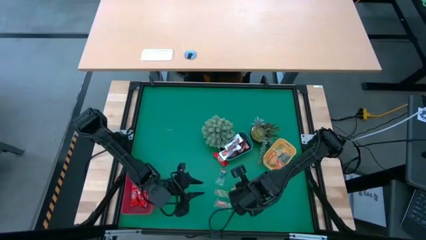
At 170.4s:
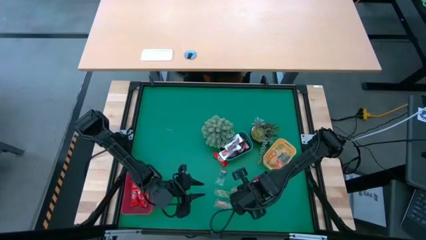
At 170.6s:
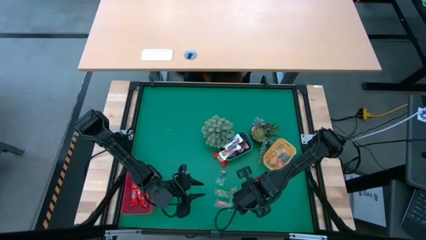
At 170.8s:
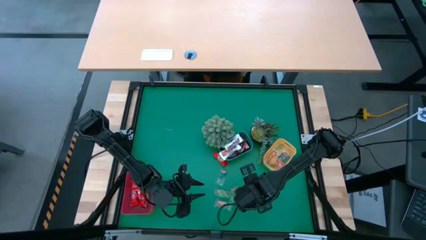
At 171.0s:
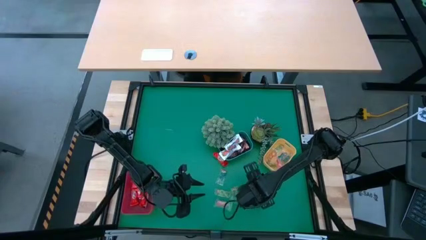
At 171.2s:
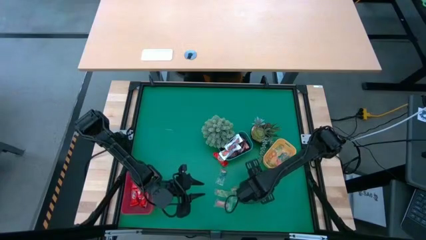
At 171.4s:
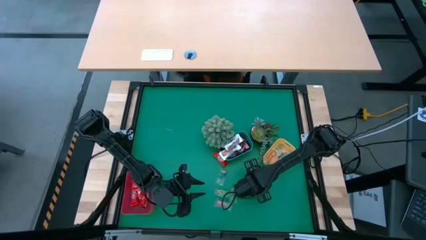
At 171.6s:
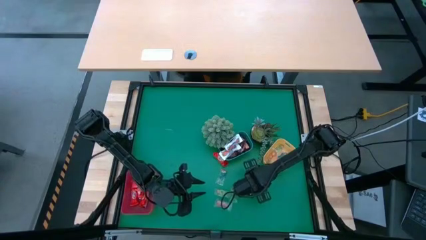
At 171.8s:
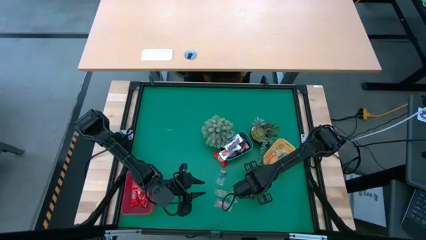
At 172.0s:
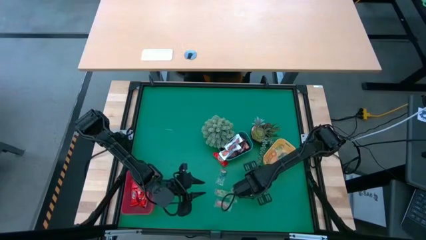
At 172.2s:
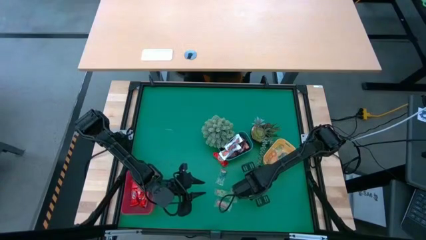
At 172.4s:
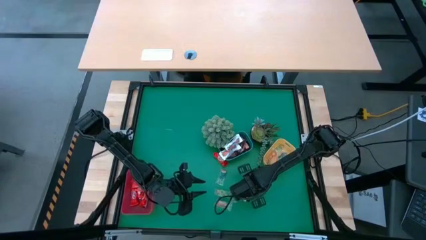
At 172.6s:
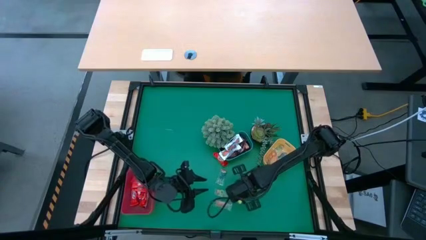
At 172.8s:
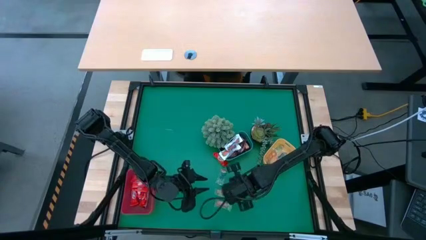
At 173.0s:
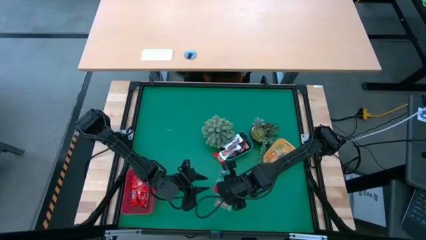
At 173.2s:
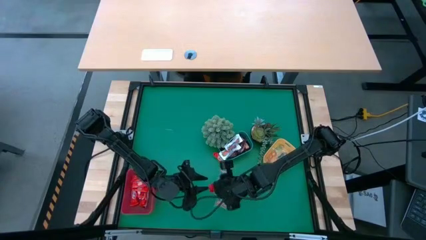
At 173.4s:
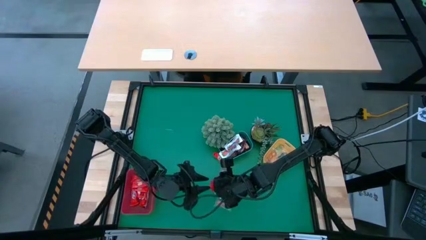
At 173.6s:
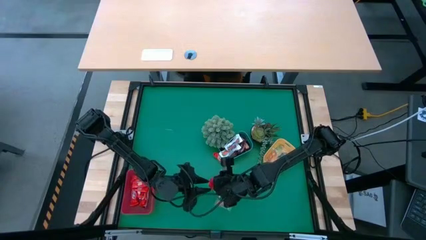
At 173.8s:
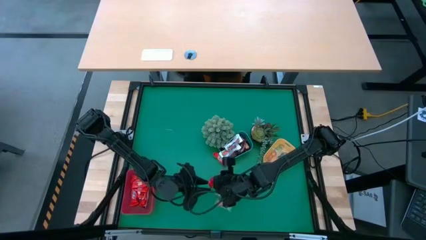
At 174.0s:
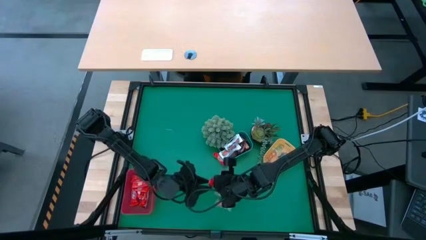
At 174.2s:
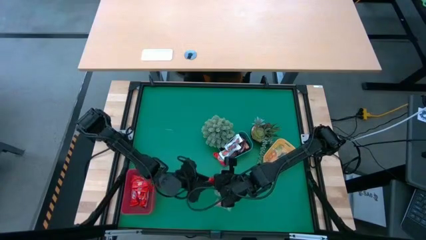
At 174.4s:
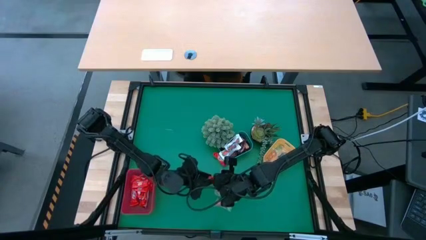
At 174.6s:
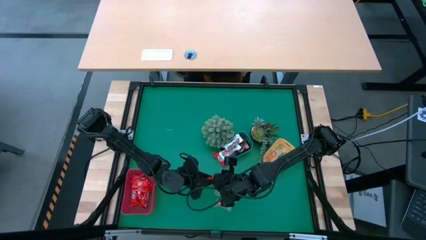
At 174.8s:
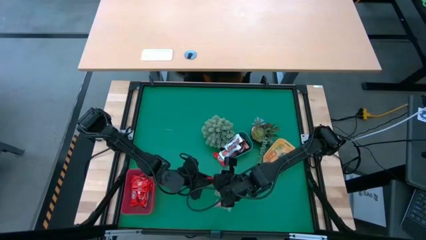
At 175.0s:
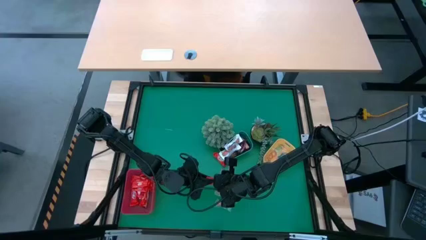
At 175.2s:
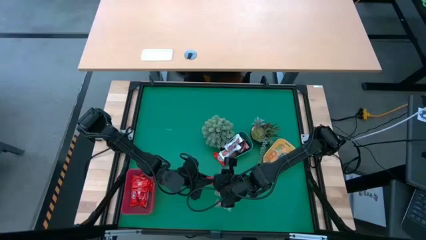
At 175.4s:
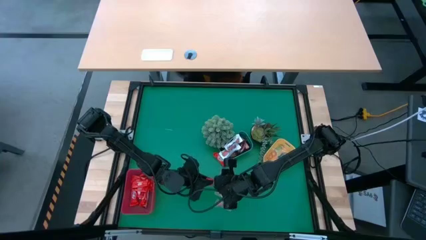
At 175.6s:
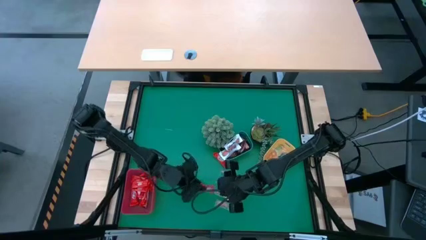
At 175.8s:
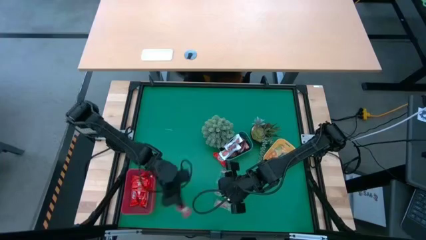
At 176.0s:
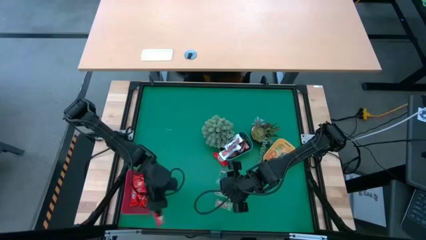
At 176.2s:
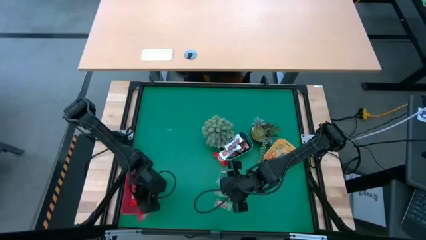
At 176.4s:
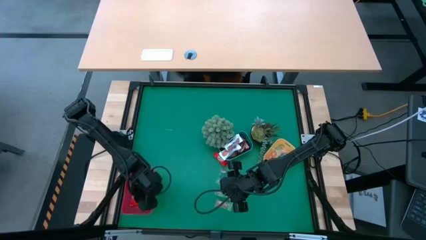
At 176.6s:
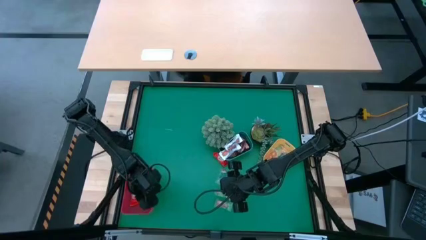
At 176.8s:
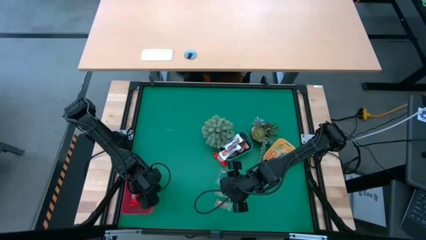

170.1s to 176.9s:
Task: Organize candy in baskets
Put the red chocolate into the red bin

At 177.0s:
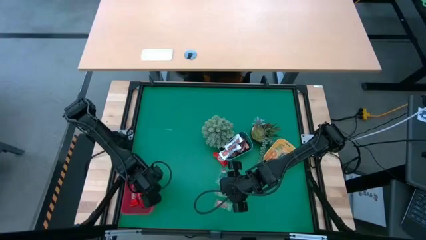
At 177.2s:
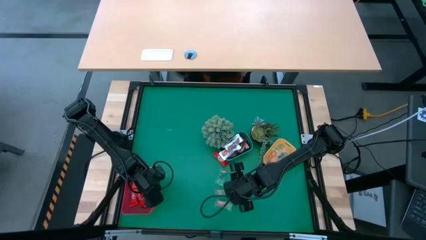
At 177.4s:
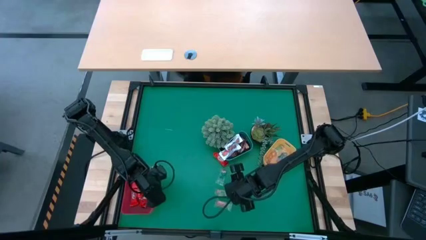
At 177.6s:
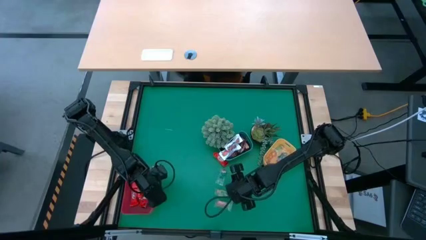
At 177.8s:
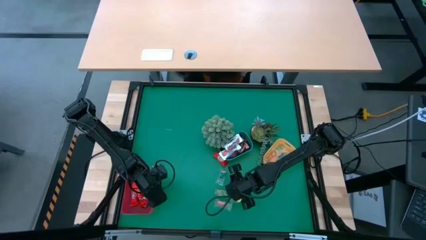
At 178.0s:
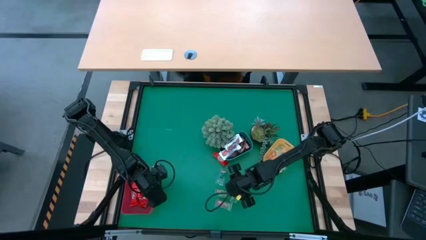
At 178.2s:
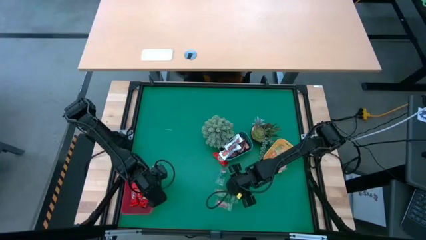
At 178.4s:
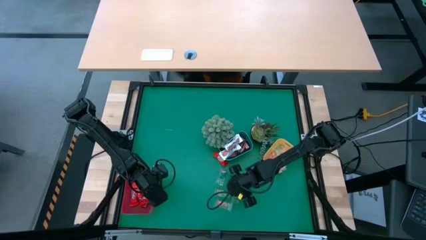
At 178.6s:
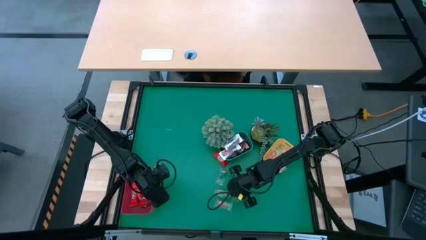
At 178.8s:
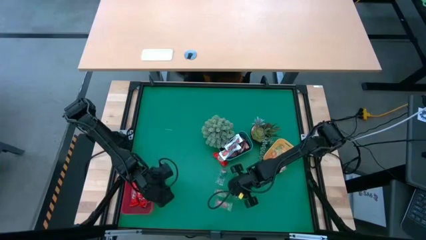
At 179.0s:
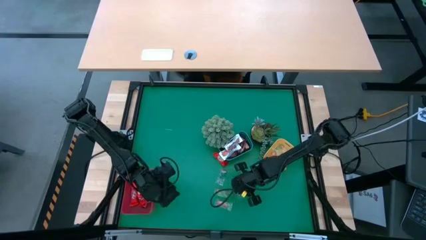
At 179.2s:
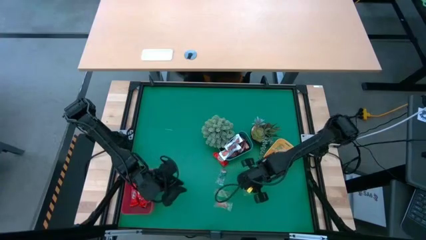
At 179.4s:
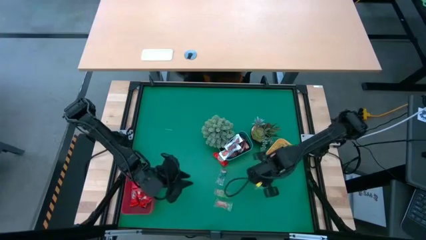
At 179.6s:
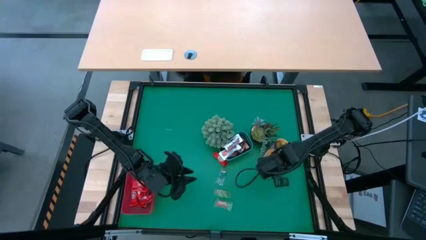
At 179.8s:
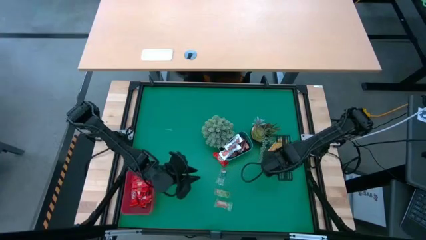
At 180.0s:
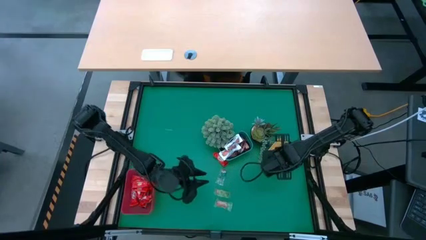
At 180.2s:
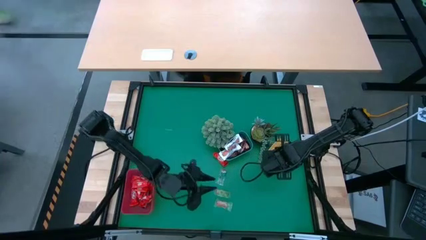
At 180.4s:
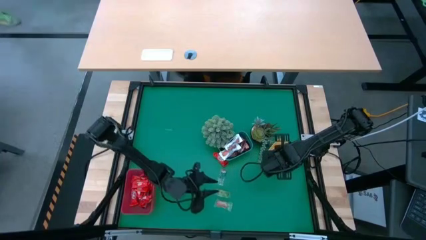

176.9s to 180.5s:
Put the green gummy into the yellow bin

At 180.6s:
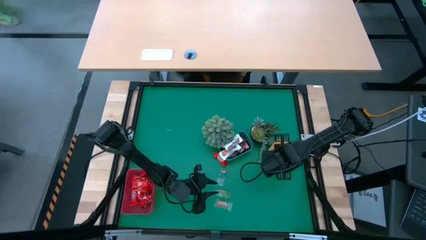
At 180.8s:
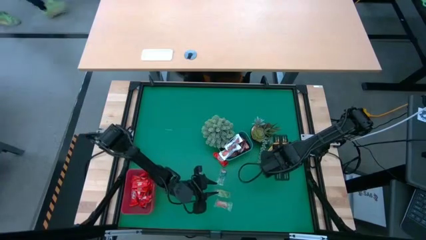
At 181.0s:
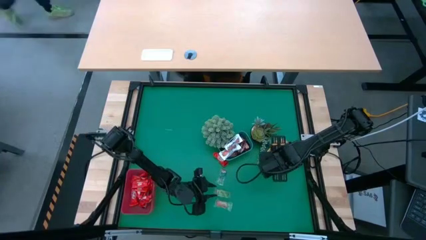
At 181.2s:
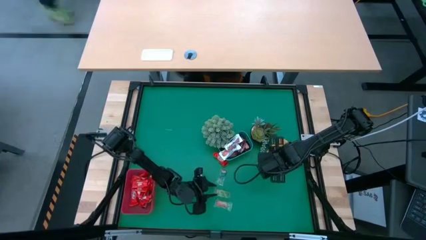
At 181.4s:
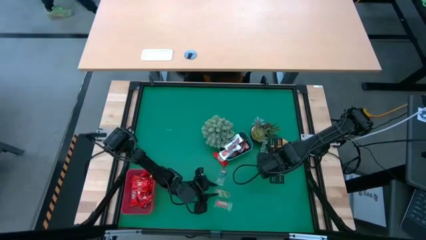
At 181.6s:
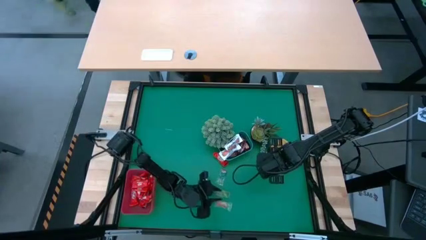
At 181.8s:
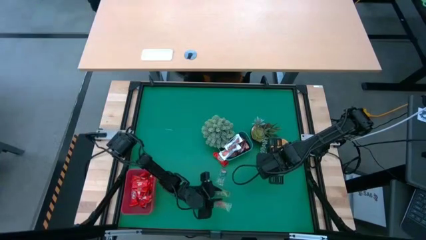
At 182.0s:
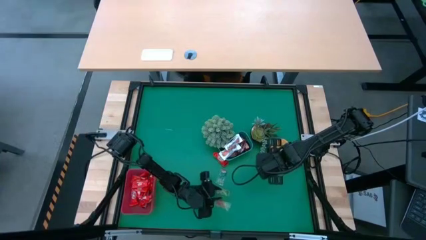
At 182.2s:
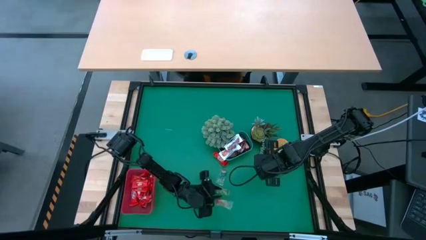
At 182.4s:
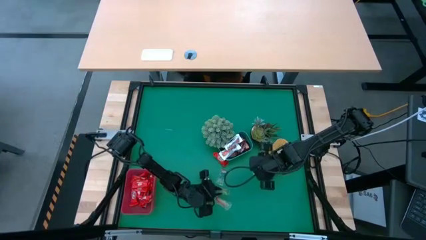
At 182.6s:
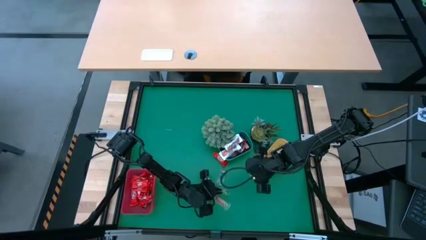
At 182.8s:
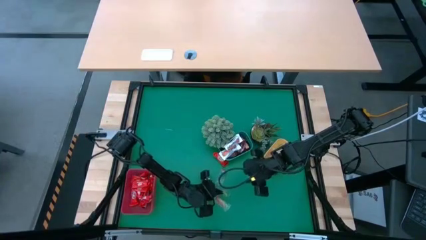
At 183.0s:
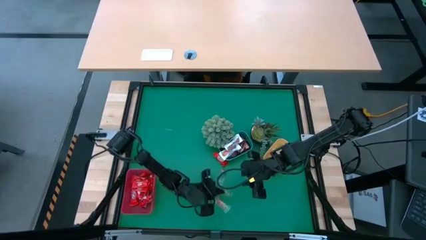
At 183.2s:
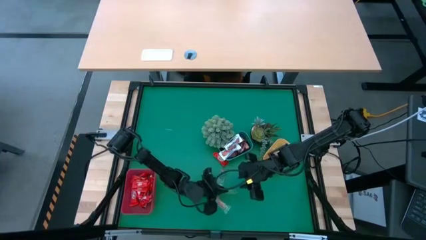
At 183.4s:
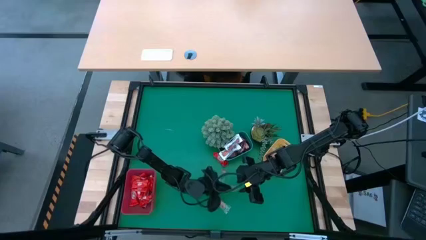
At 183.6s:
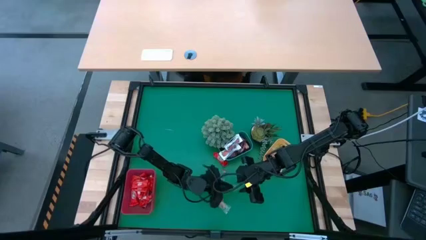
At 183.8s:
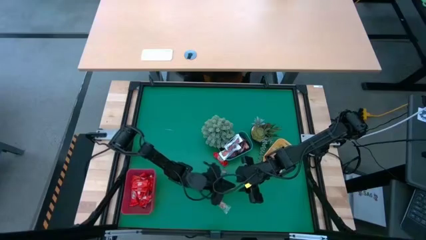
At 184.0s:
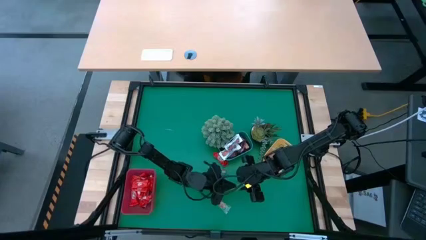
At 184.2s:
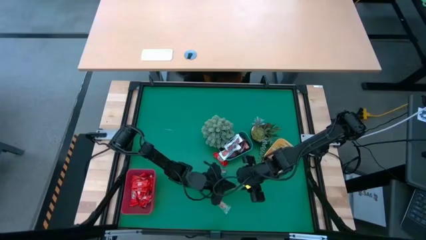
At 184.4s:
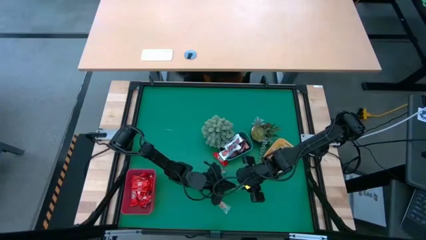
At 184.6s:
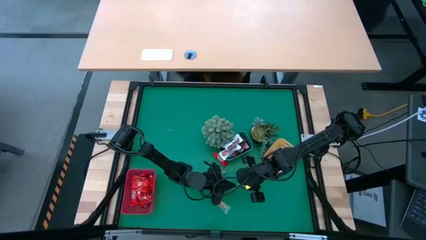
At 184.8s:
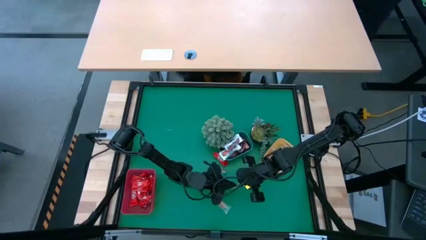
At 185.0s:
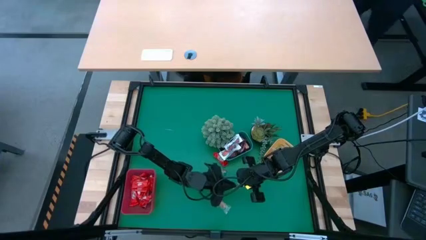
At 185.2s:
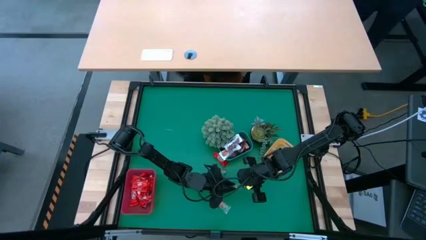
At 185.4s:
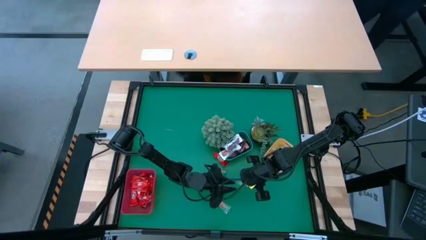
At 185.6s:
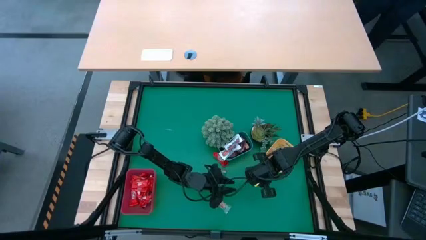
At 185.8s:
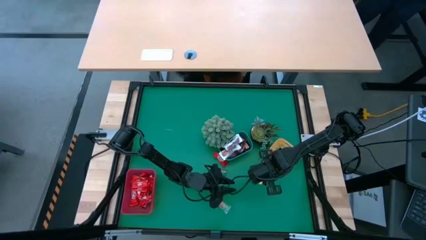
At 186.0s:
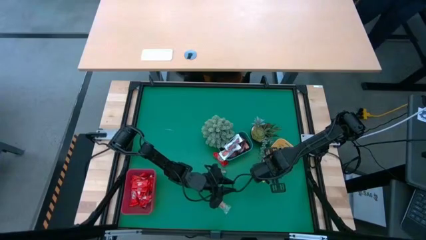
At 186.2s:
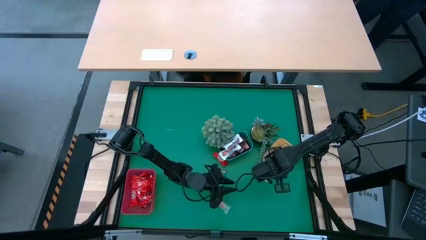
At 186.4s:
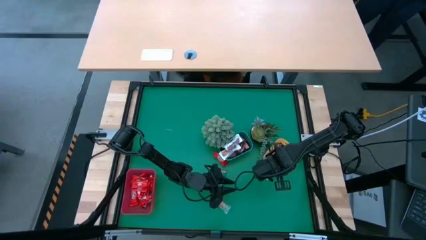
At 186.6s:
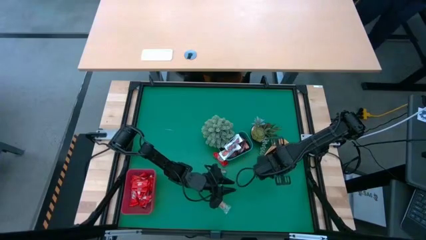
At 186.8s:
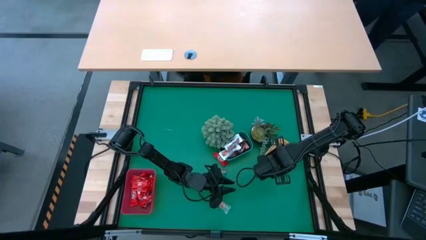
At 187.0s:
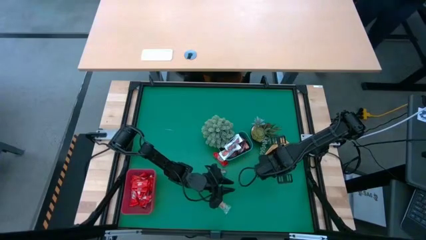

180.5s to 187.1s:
Put the green gummy into the yellow bin
